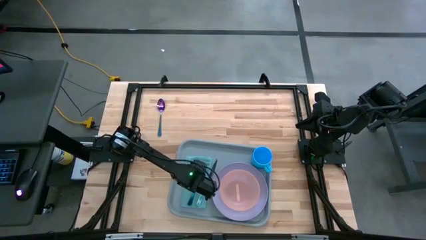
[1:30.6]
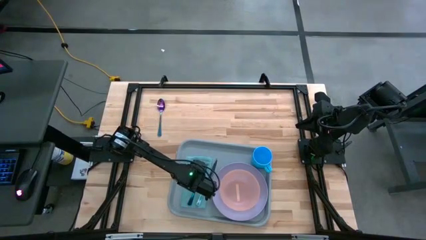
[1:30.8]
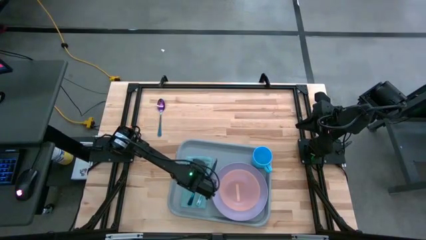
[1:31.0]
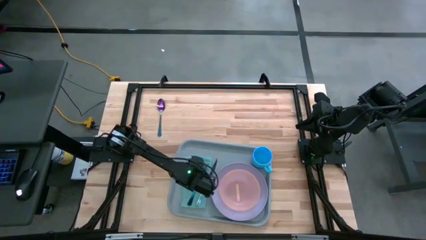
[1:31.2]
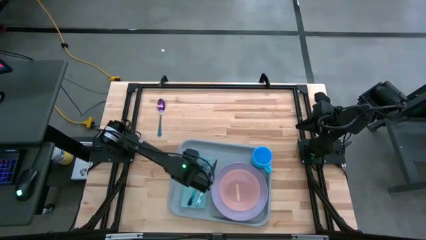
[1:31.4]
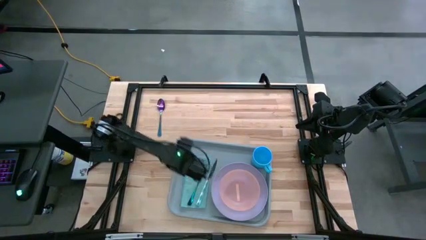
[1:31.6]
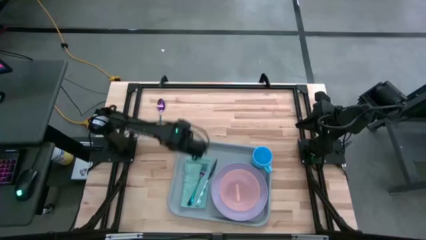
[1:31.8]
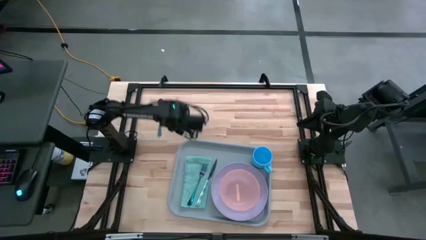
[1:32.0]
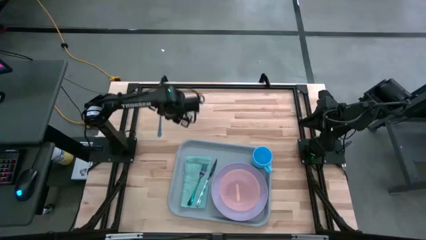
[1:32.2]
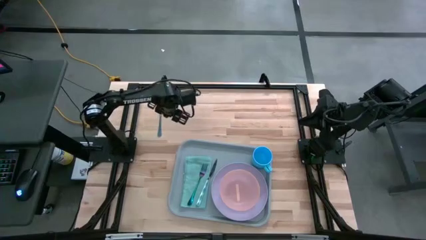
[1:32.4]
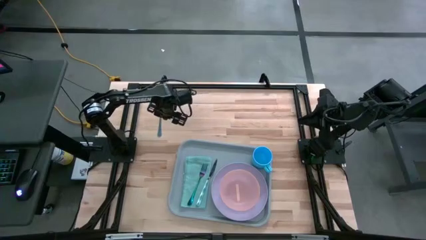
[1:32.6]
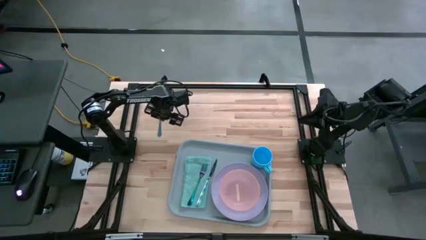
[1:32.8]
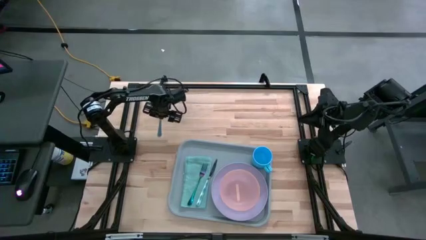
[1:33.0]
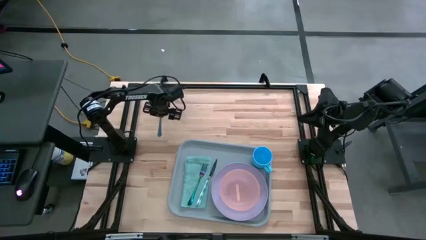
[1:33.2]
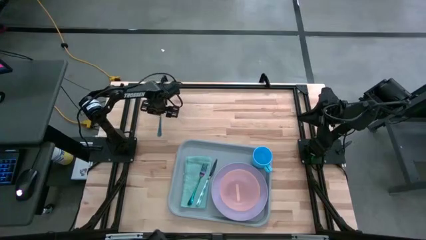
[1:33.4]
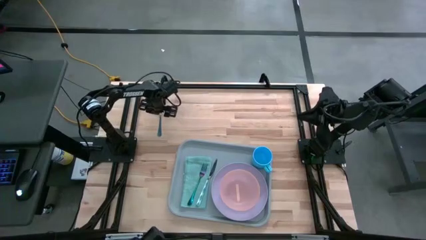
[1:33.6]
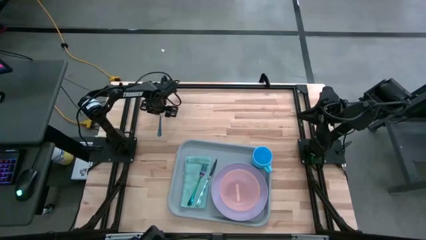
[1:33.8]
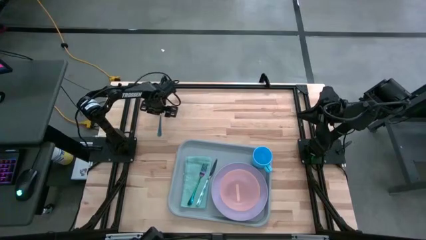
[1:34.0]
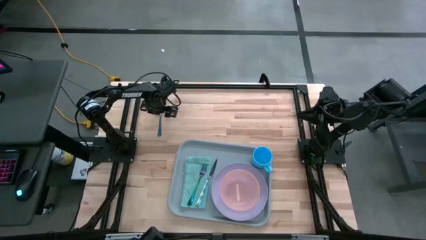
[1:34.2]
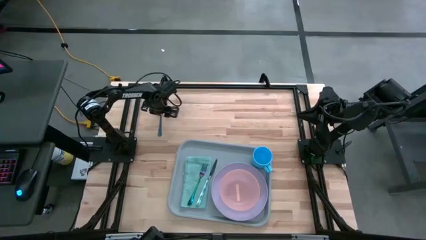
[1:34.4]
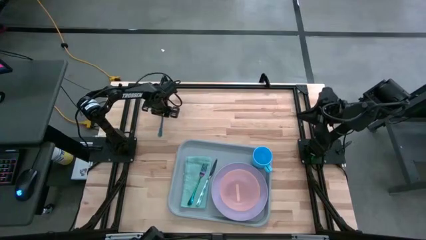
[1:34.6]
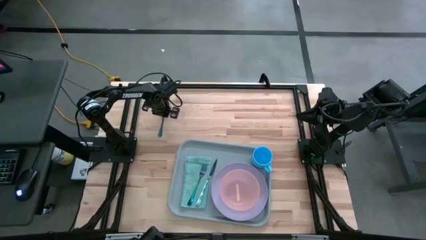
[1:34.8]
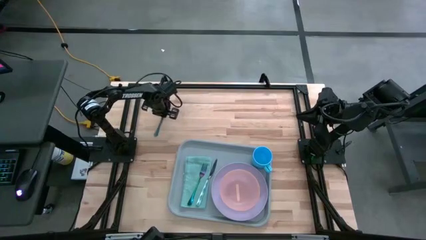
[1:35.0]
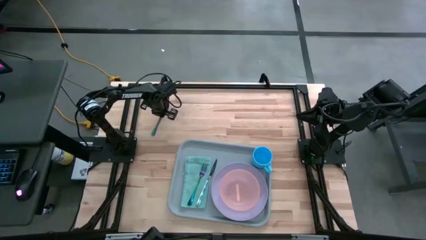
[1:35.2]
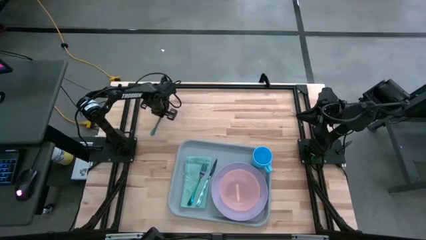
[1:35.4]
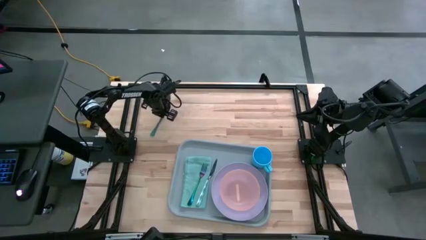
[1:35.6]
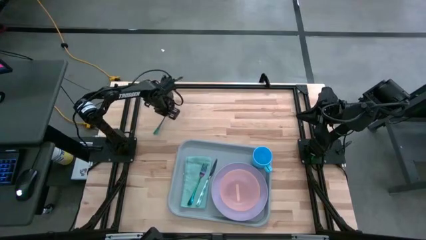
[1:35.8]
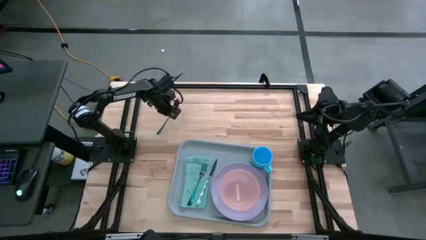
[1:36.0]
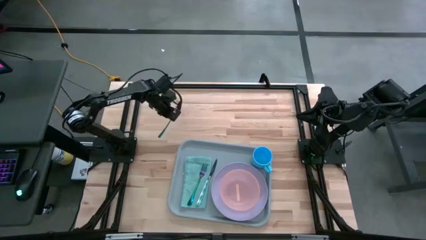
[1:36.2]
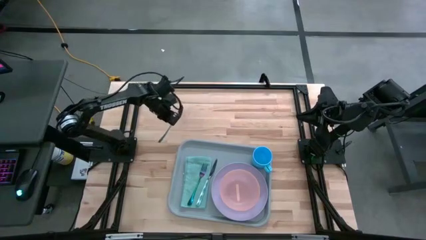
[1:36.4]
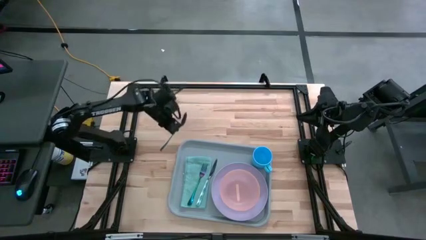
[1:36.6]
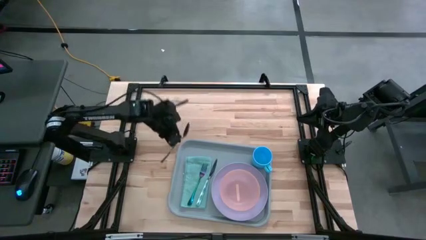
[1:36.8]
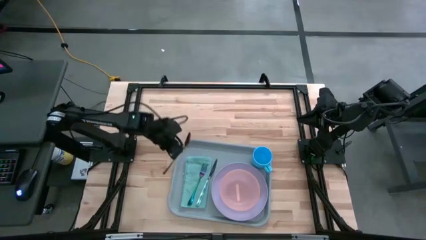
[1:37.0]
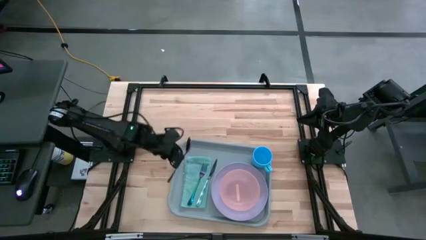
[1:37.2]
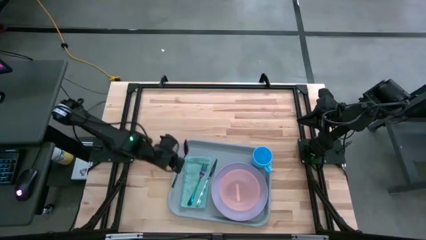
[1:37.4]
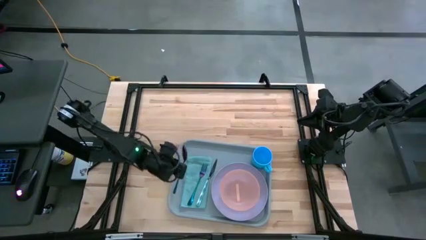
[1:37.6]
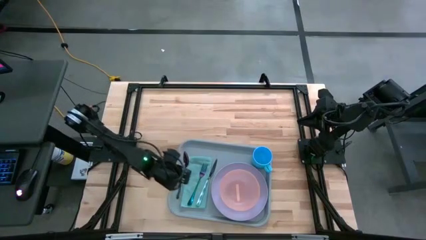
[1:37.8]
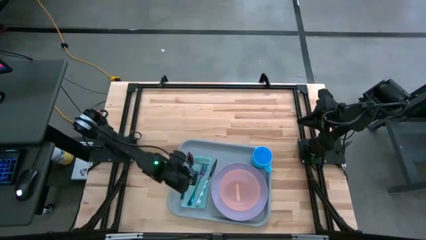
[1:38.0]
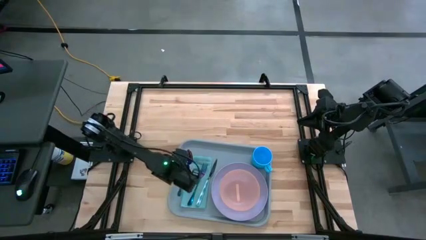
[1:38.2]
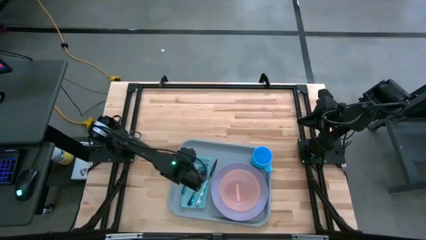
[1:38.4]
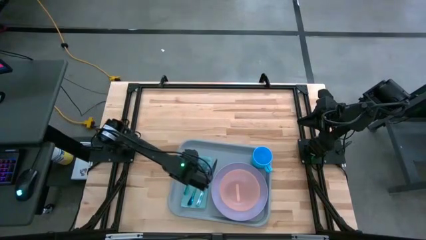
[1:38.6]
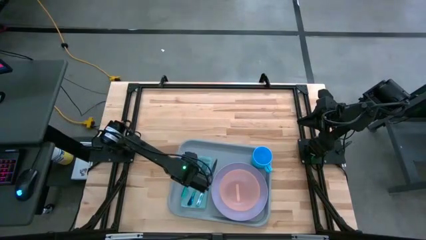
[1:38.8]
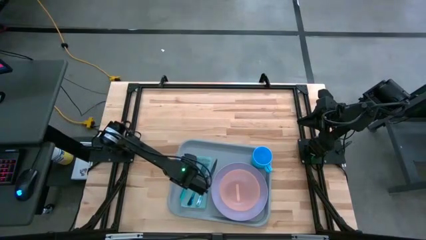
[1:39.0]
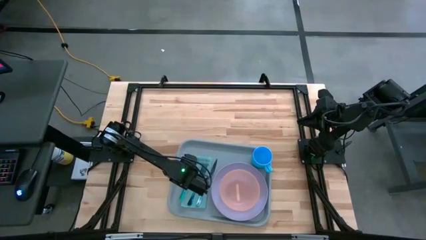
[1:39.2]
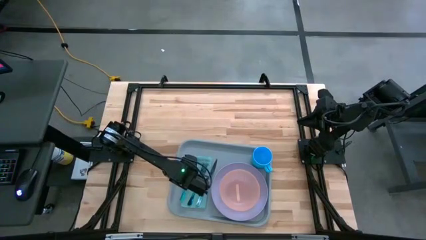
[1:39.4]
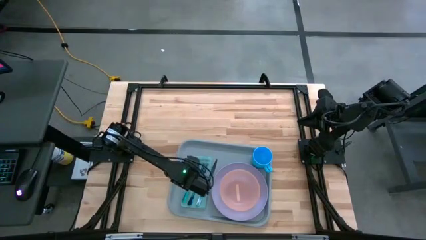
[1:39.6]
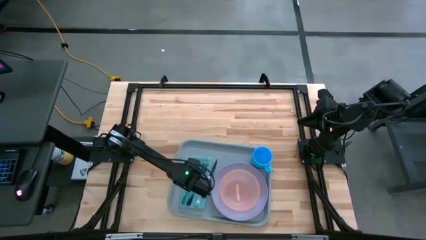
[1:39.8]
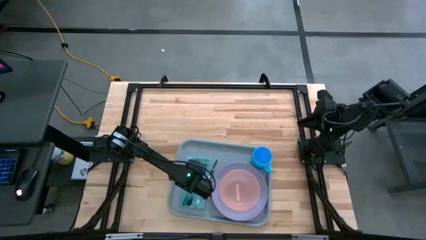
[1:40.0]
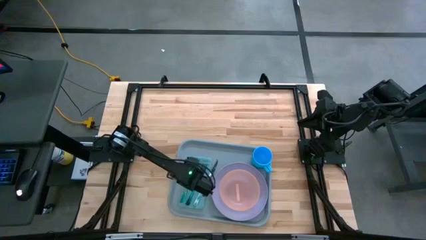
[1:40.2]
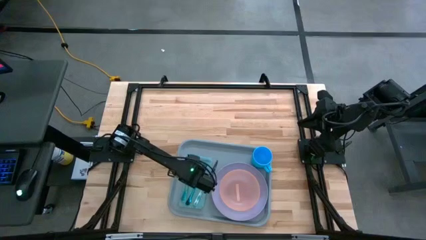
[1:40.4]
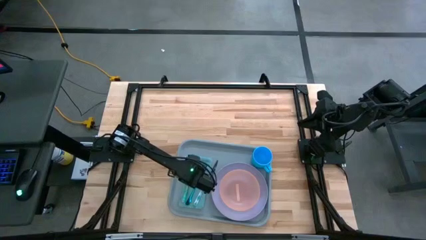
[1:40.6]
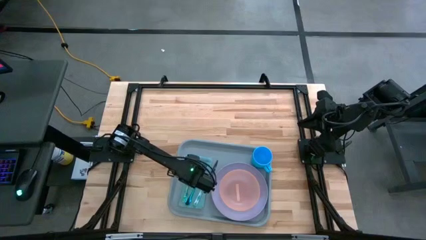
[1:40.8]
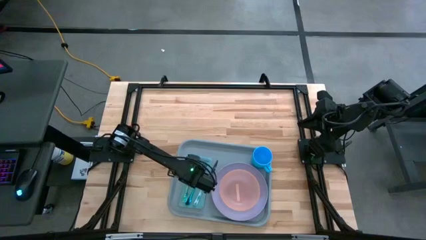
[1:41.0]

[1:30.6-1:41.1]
Task: Set up tray
Put the blue spoon on the blue napkin to the left of the blue fork

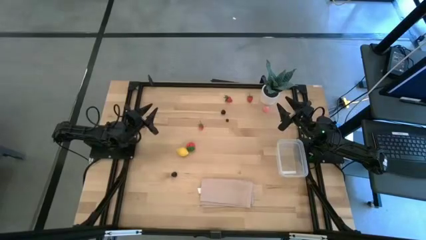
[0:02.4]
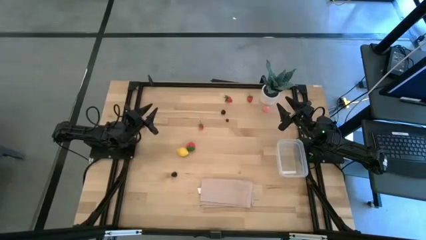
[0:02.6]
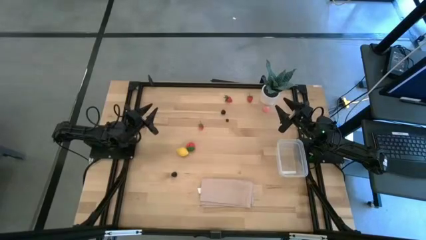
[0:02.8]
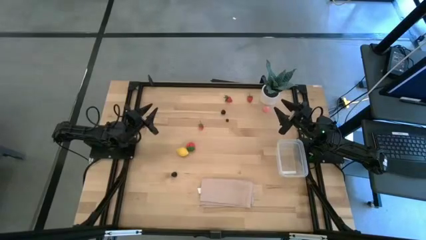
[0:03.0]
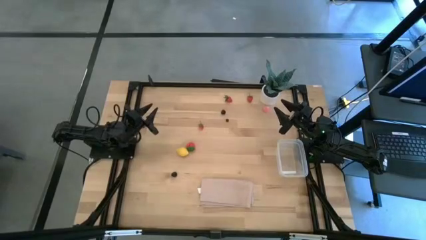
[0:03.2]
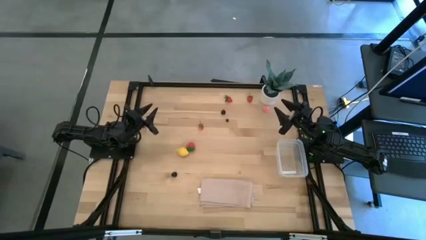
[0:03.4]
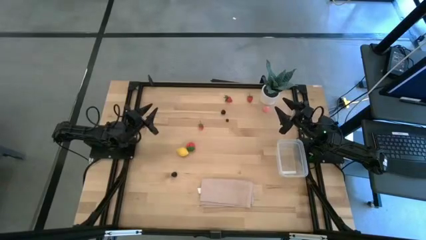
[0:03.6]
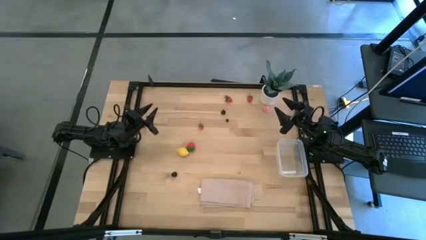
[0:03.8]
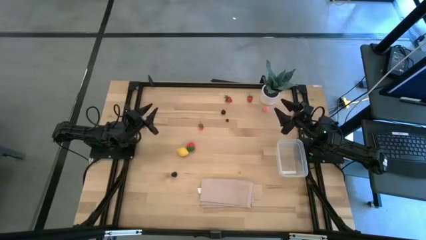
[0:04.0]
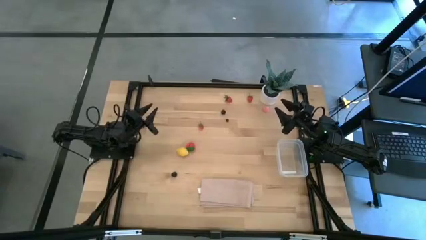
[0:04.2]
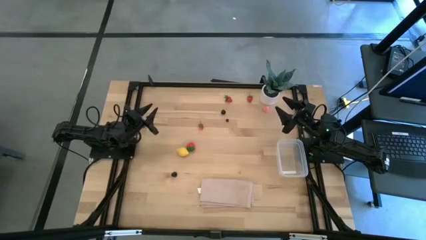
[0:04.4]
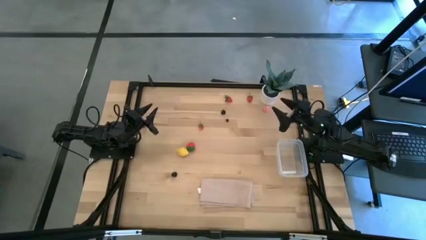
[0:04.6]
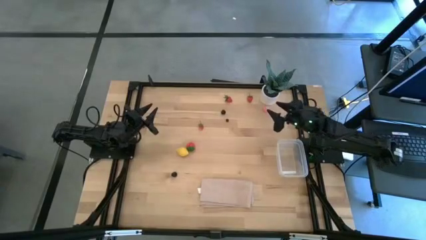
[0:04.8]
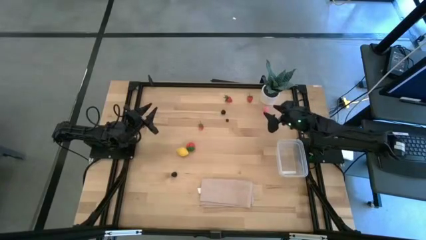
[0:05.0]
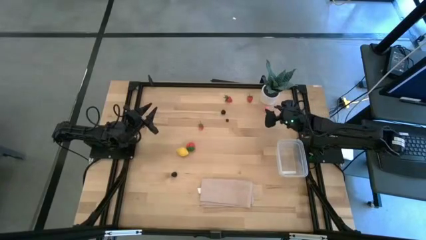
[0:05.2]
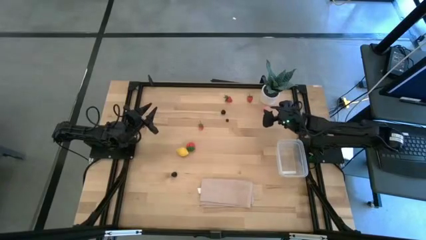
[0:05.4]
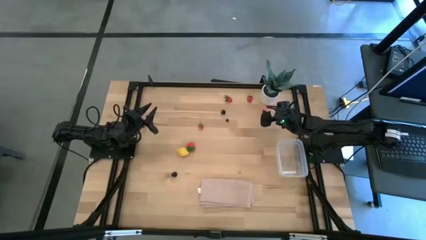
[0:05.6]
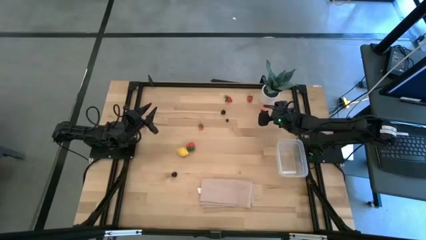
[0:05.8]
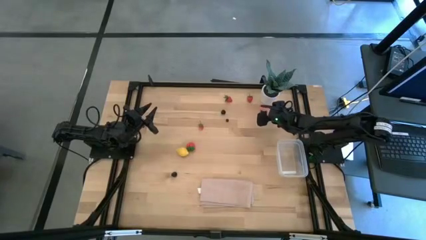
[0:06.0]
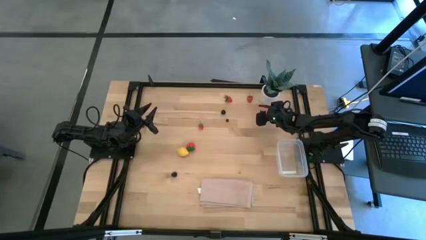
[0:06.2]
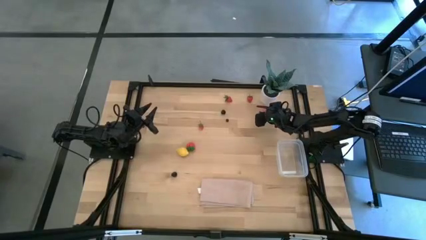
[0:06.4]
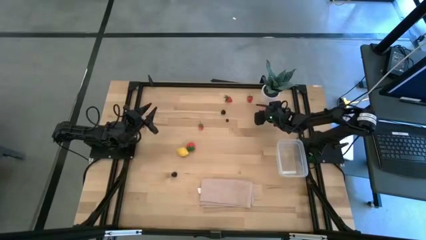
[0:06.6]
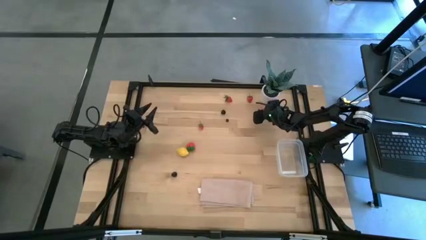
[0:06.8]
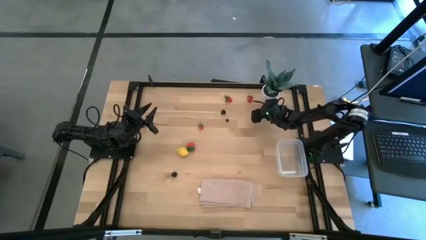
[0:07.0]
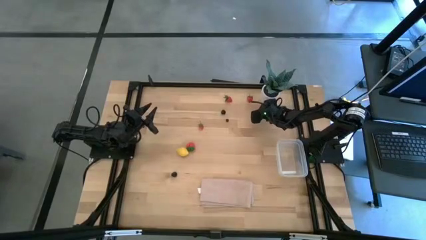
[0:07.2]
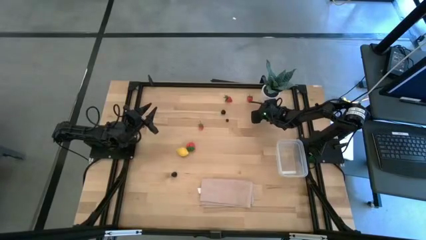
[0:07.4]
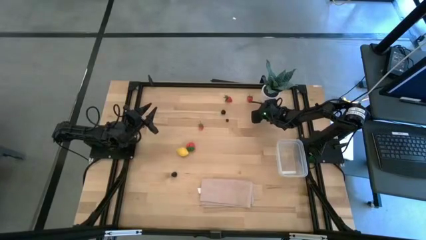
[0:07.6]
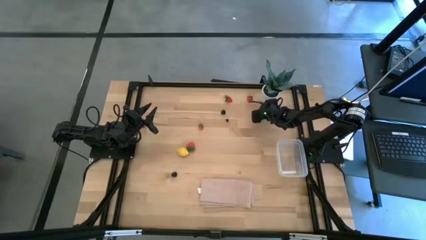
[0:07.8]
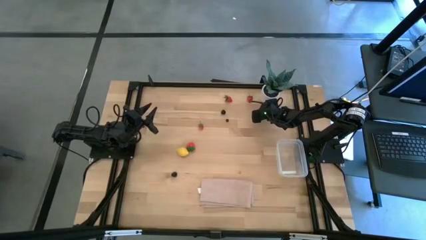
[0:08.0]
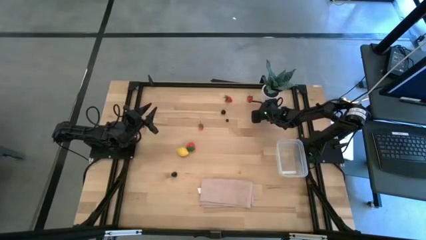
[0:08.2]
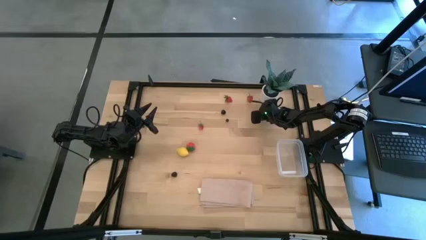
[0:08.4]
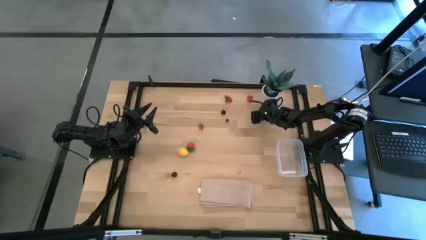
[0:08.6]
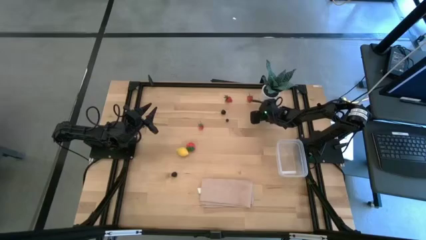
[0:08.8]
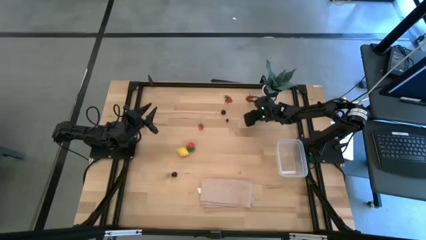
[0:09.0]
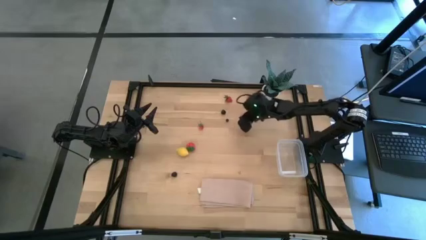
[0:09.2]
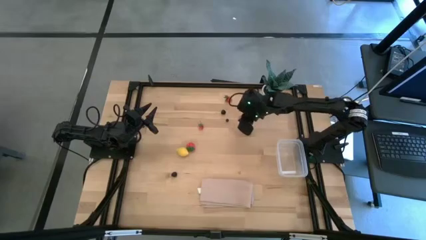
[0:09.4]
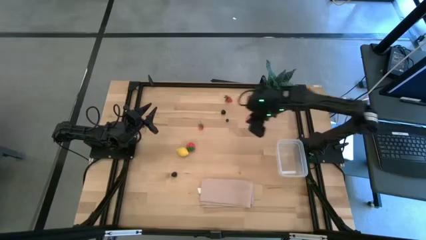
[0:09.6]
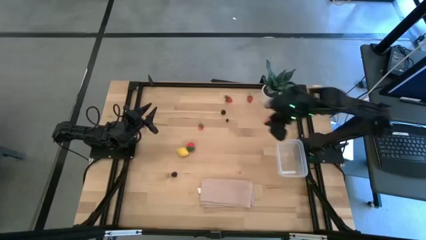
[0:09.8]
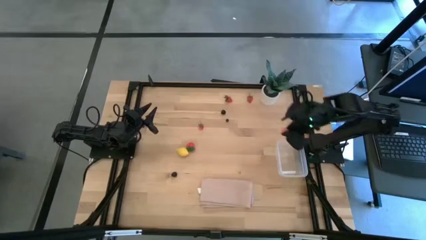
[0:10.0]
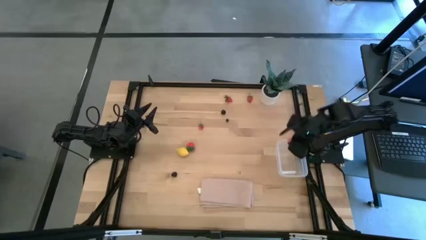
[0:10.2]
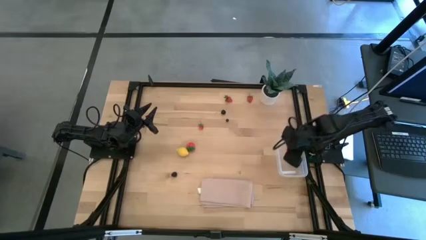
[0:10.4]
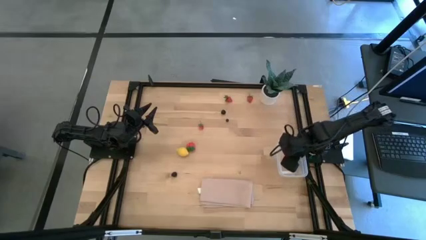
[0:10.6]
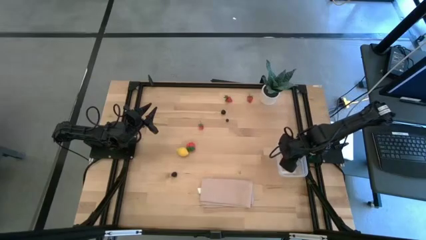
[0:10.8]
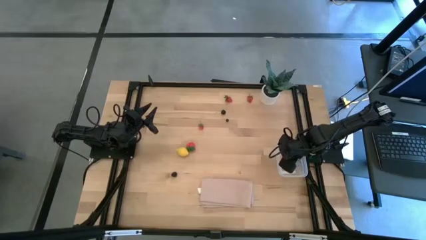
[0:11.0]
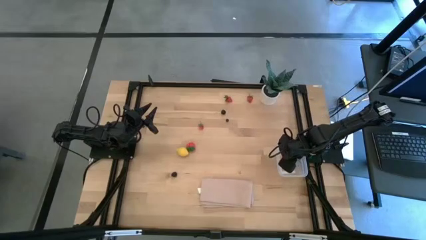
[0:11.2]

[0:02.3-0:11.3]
Task: Pick and placing Produce into tupperware
Put the pink peach into the transparent bin
